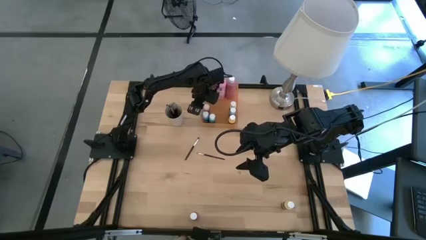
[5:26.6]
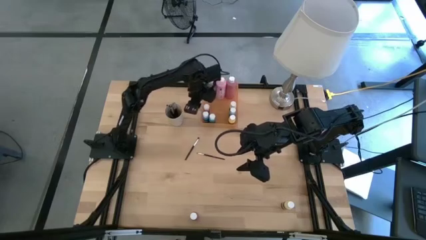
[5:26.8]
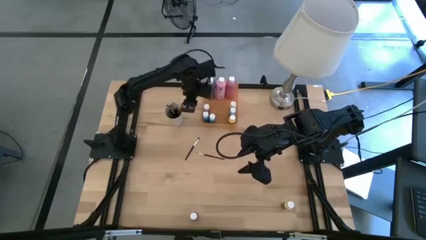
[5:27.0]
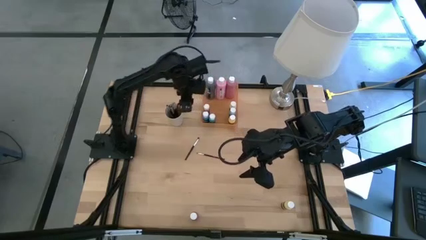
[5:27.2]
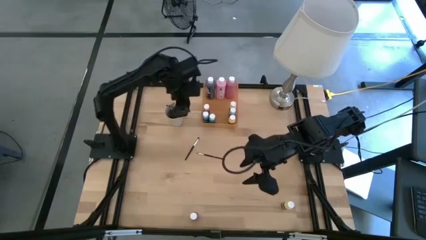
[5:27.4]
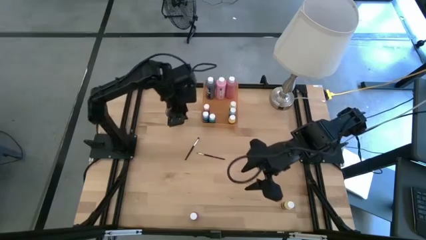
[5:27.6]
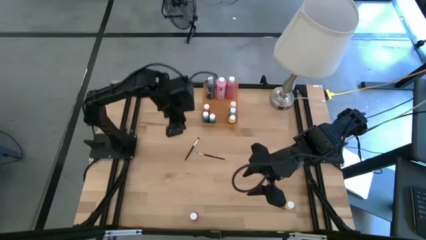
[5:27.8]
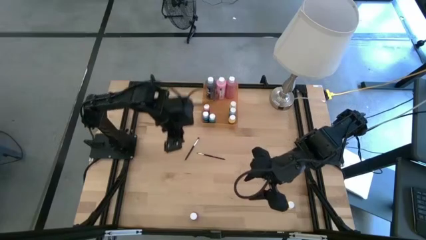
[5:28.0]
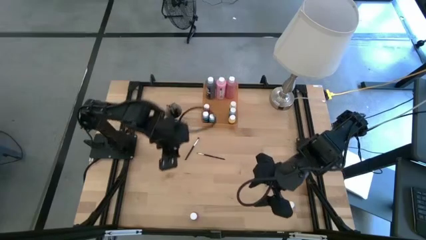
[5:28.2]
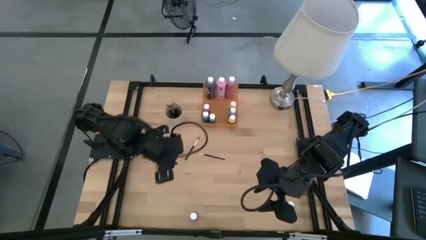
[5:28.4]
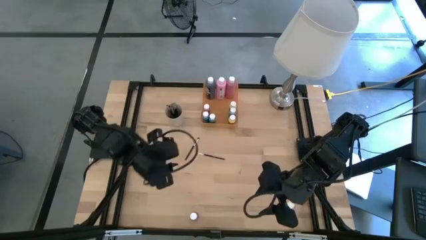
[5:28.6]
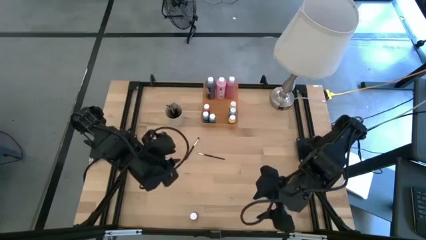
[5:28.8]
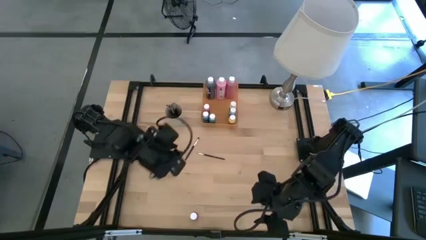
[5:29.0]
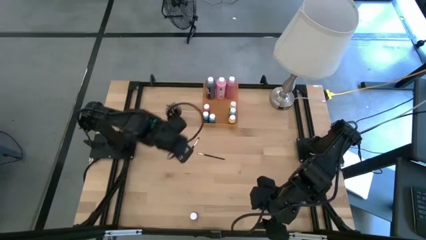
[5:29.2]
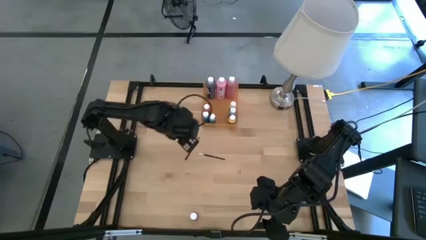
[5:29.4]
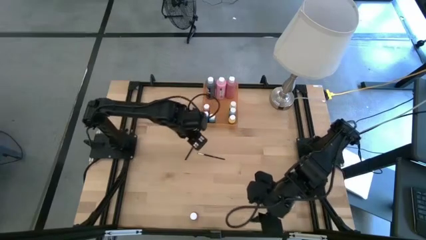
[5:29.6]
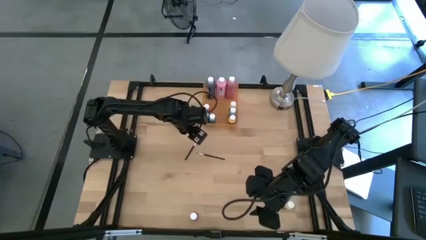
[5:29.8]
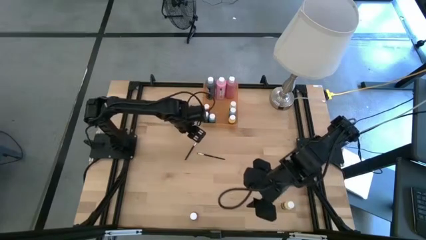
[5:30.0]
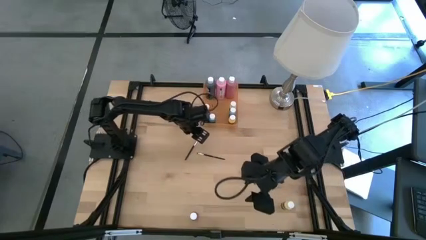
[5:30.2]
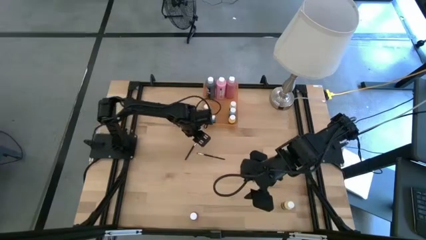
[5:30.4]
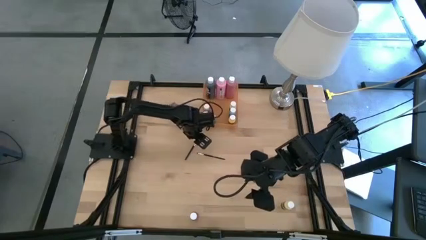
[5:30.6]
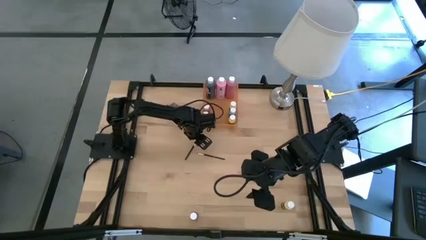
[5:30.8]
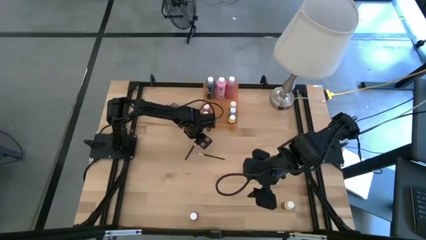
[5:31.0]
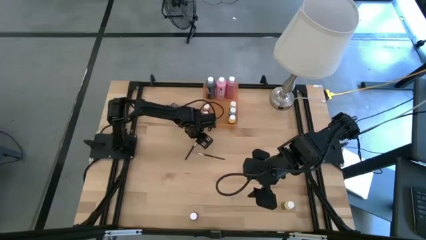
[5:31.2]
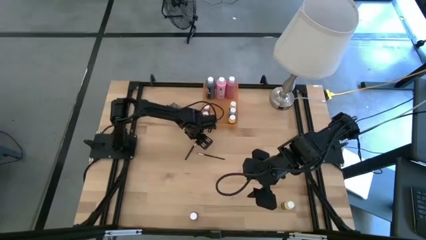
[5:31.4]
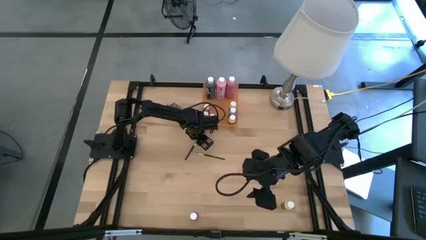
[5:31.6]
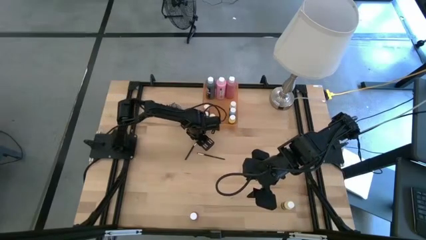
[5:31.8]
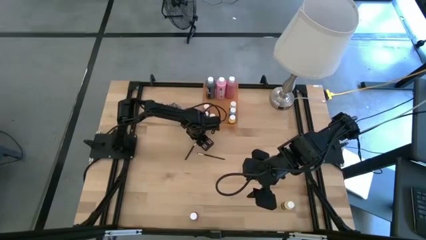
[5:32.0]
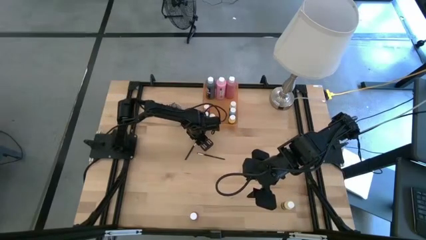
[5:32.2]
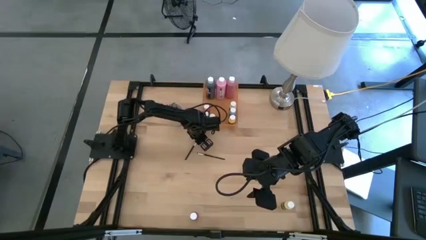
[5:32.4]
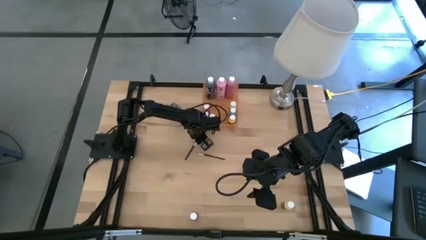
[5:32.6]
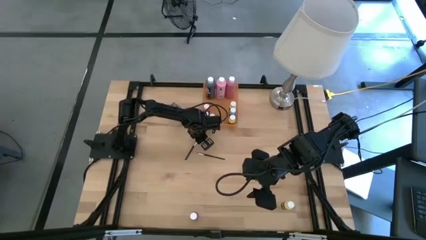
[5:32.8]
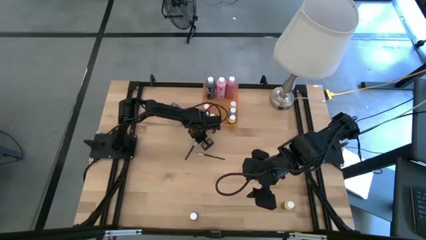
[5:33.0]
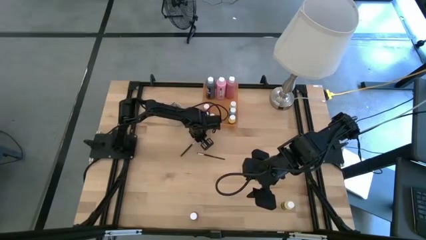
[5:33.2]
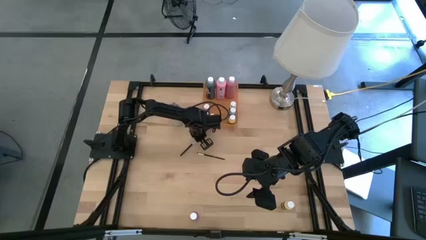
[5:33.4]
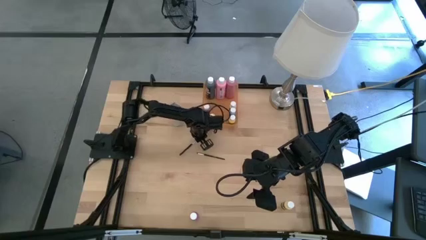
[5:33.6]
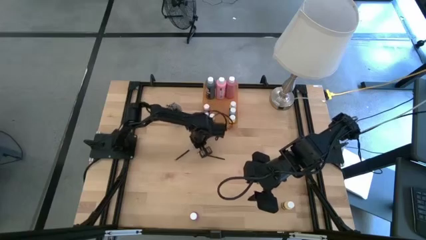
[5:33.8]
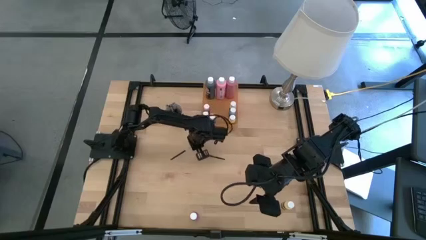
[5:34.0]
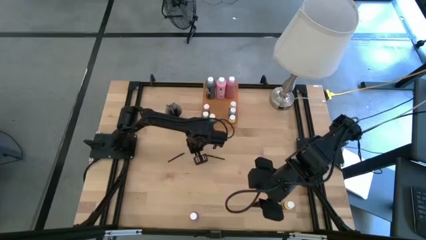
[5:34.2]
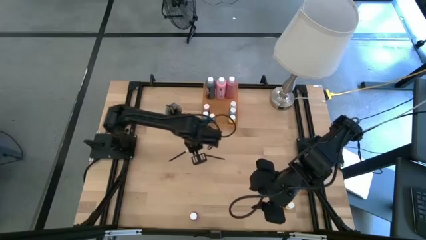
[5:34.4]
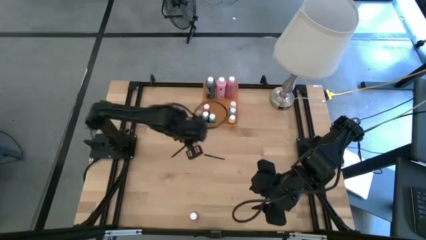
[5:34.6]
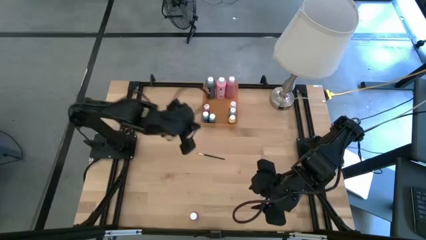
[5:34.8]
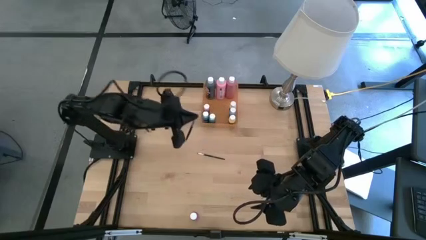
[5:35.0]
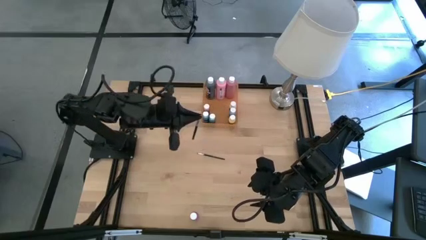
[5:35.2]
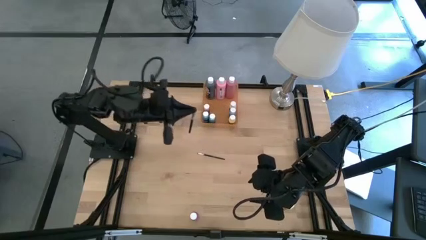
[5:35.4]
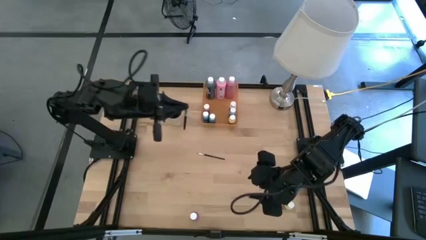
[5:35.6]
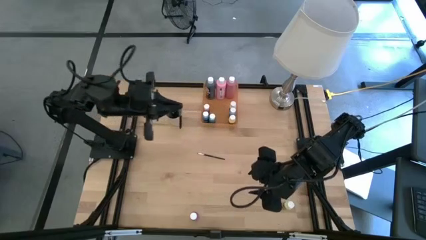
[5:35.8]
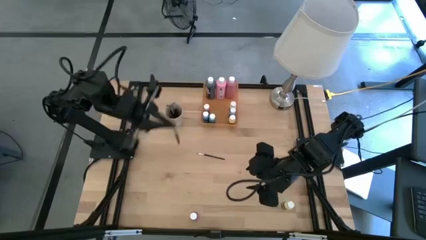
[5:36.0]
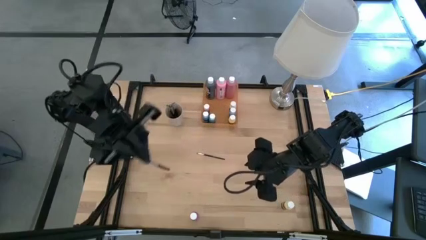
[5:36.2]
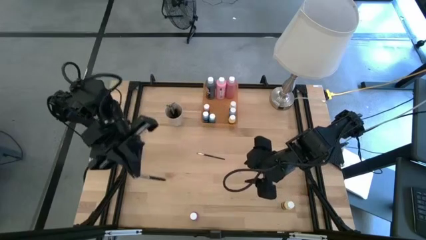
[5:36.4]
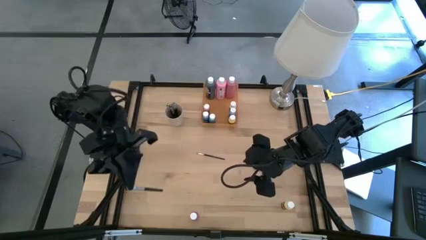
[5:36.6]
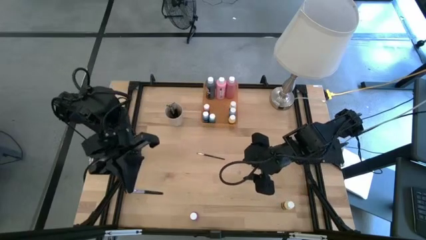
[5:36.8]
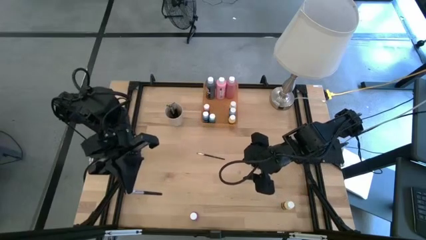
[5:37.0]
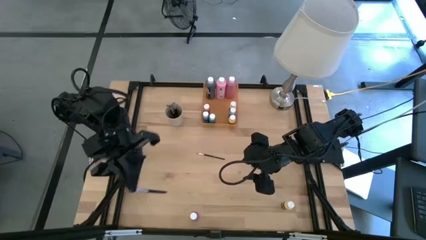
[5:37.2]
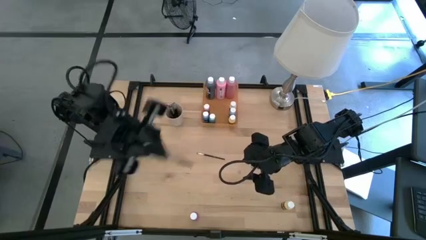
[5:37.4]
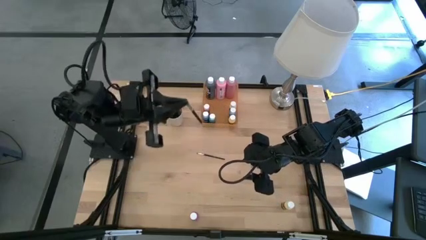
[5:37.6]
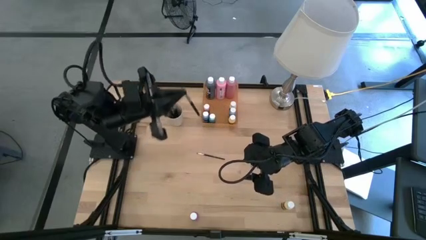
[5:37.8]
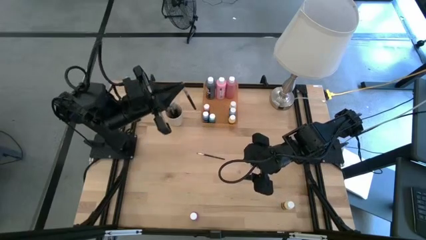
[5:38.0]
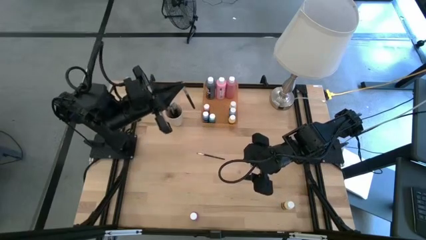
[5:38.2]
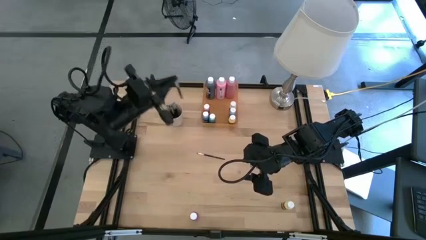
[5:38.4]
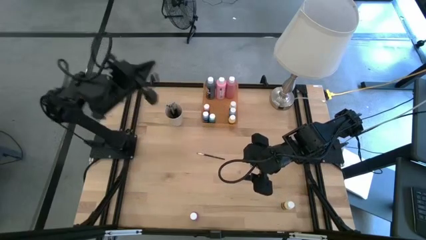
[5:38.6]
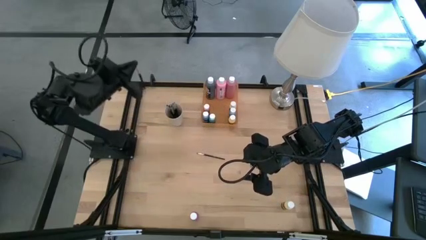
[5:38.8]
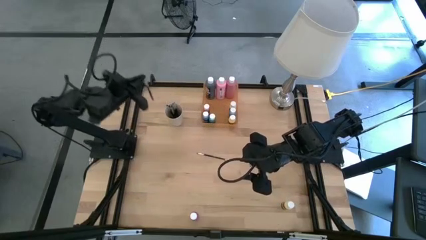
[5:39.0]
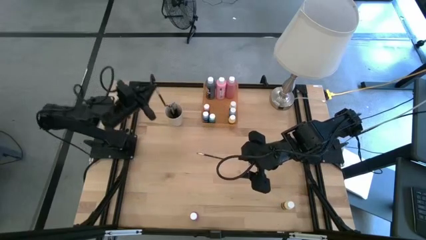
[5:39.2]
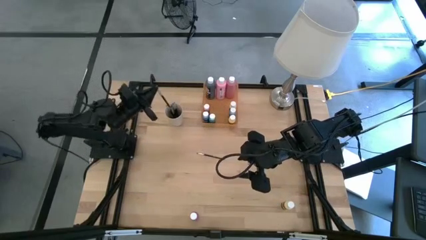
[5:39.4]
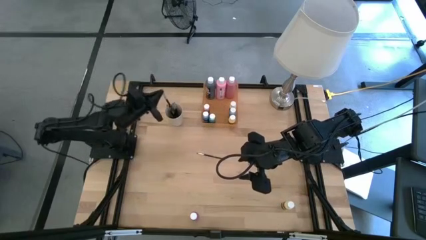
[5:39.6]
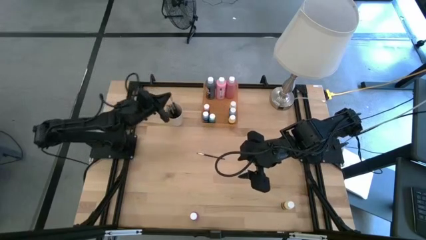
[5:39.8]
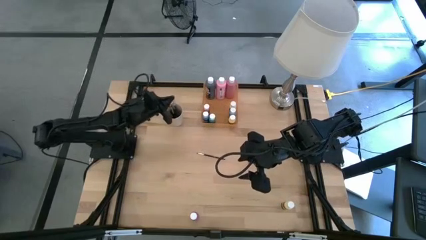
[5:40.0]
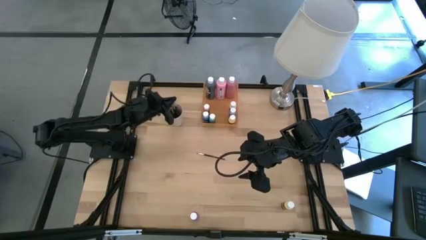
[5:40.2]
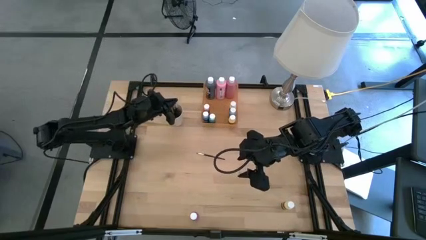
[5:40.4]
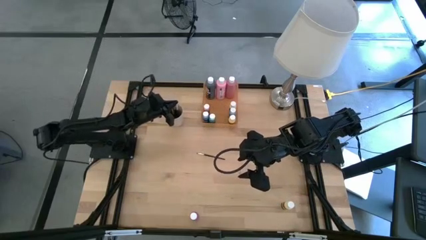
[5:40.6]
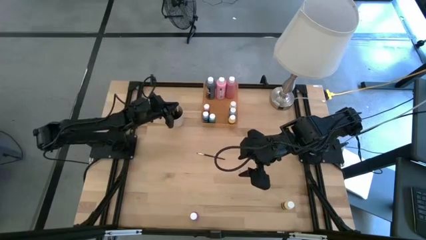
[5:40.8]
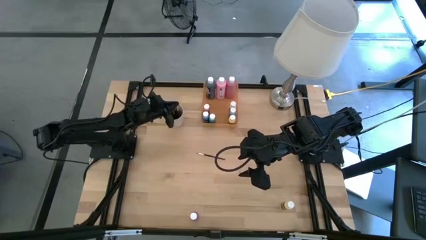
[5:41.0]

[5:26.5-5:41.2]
Task: Pick & Place Paint Supplies
Put the black paint brush into the white cup

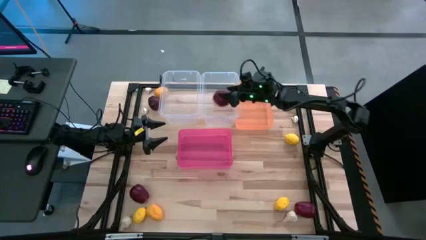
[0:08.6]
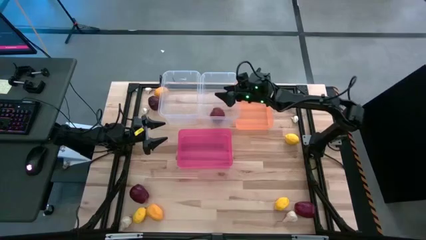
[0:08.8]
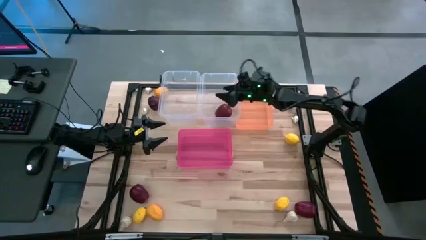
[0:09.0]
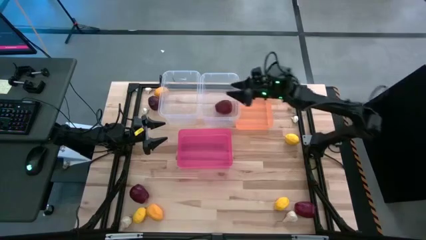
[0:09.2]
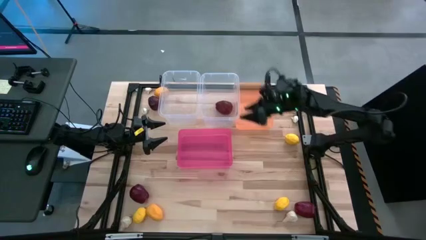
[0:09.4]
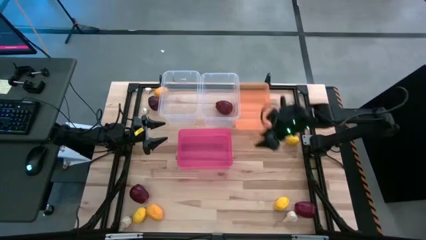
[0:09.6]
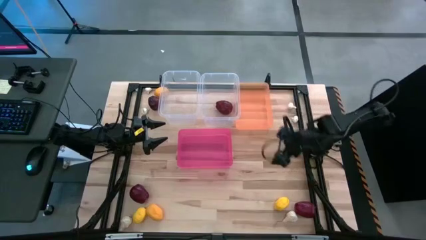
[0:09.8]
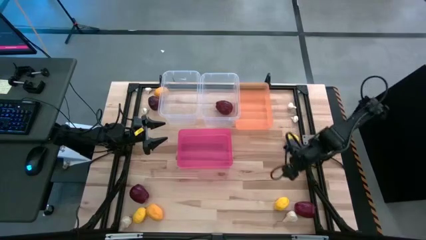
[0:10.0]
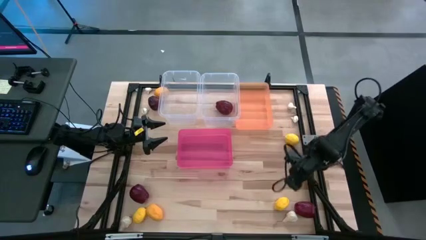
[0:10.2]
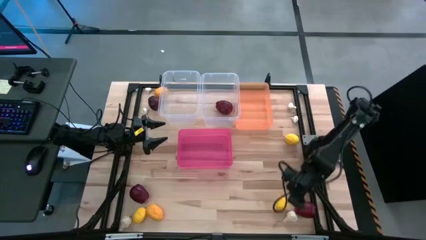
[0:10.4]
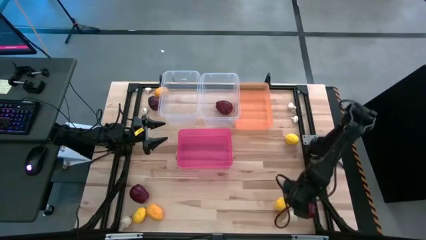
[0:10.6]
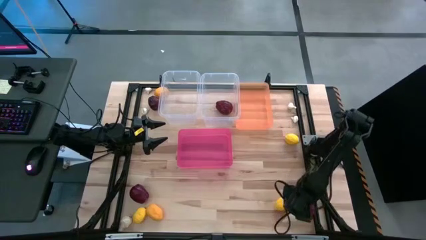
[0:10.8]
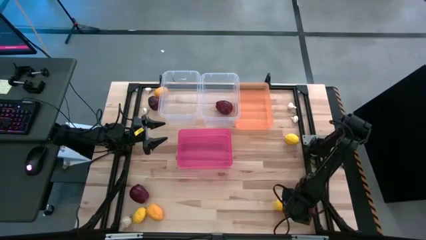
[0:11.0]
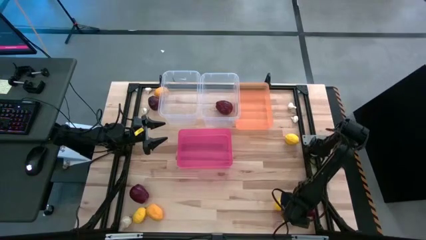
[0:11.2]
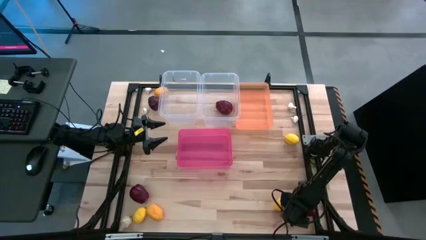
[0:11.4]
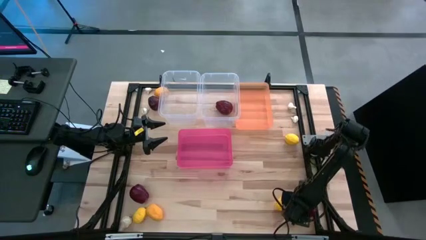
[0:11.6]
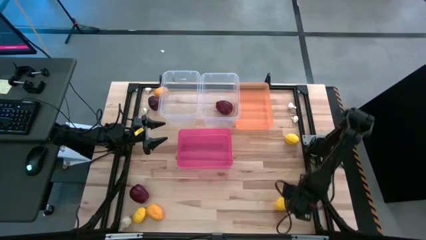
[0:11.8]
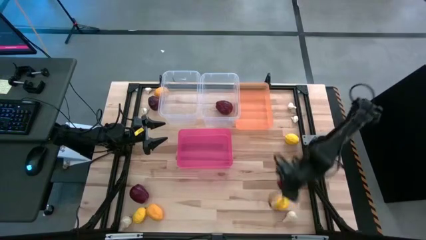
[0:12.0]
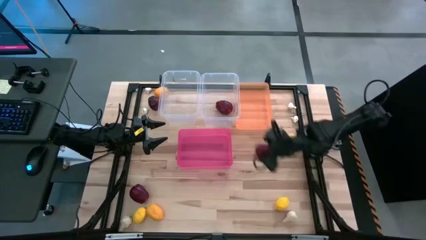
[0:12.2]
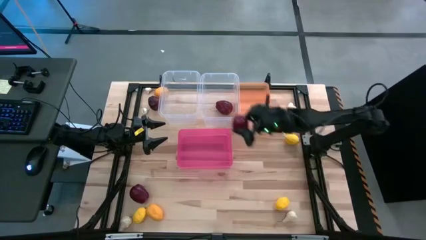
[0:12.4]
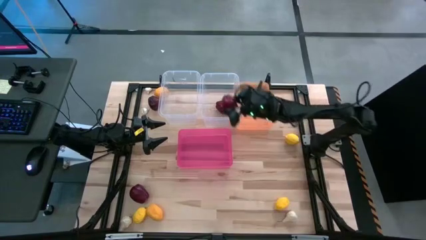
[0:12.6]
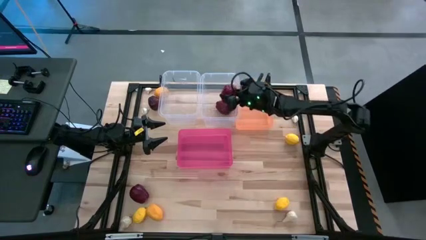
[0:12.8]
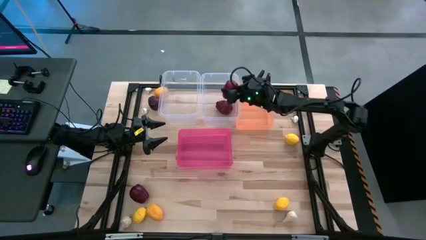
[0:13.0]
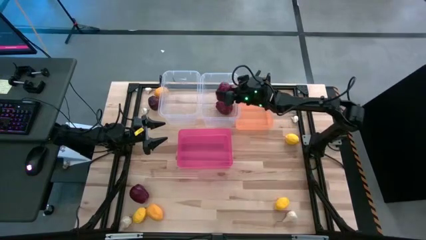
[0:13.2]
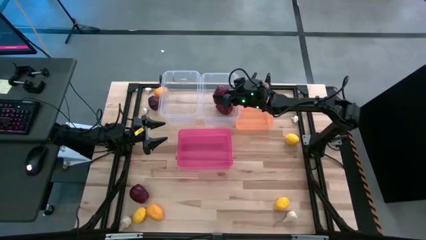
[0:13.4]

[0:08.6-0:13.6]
Task: Sort produce into baskets
Put the red apple into the right transparent bin
